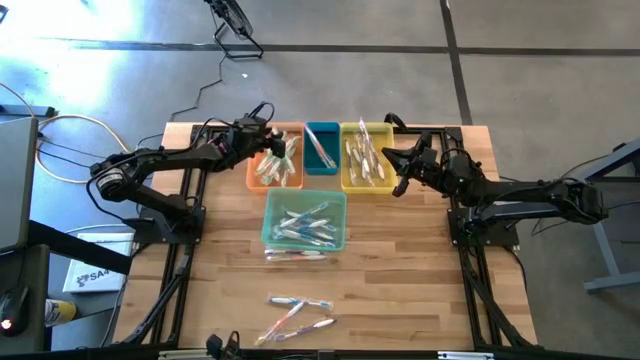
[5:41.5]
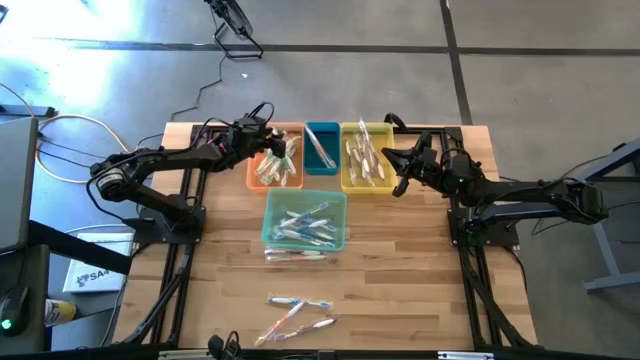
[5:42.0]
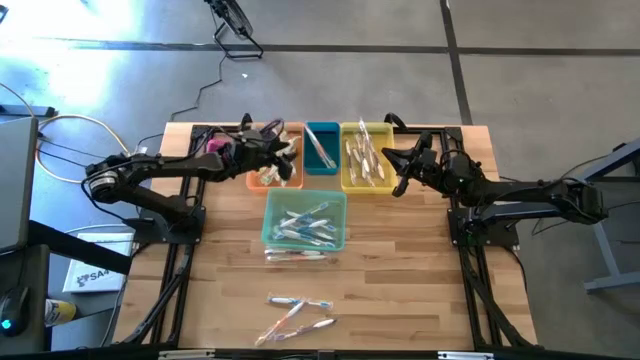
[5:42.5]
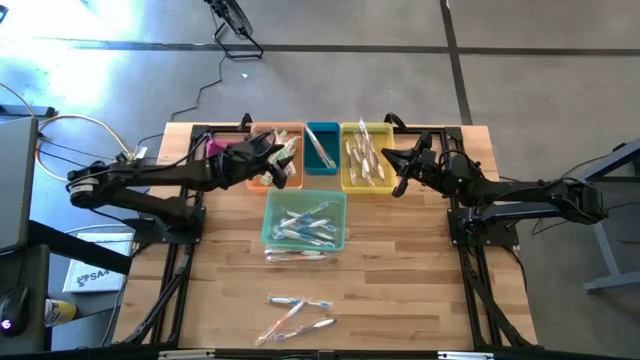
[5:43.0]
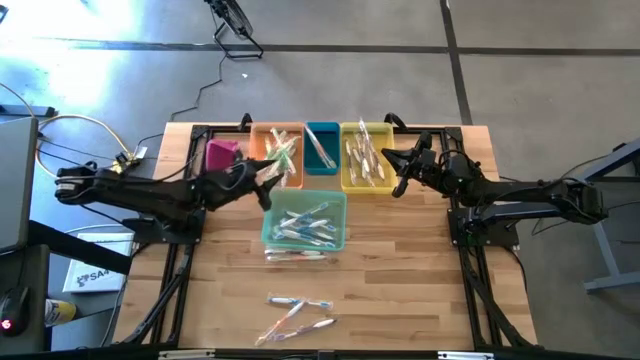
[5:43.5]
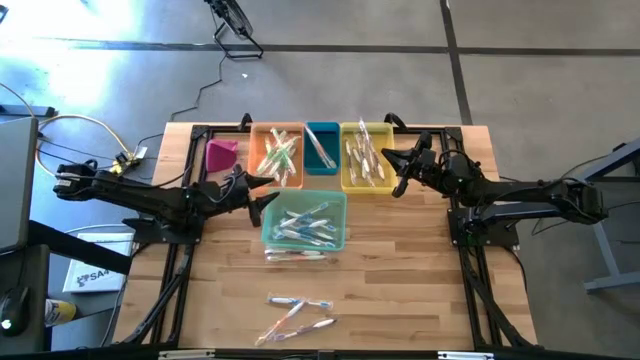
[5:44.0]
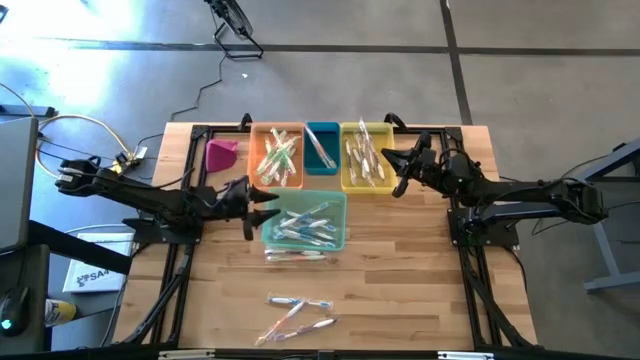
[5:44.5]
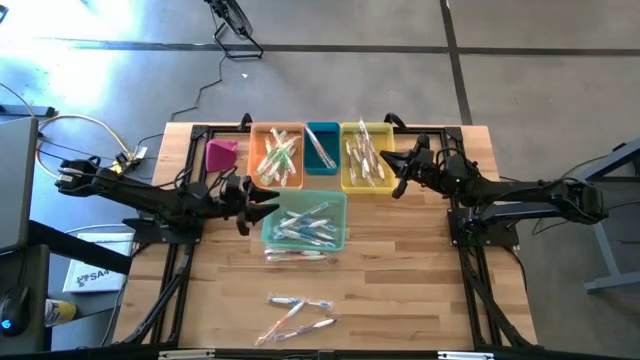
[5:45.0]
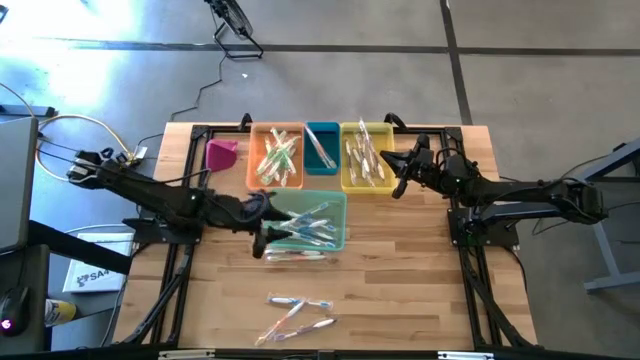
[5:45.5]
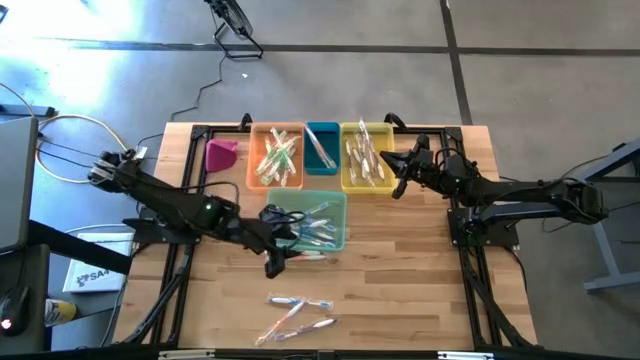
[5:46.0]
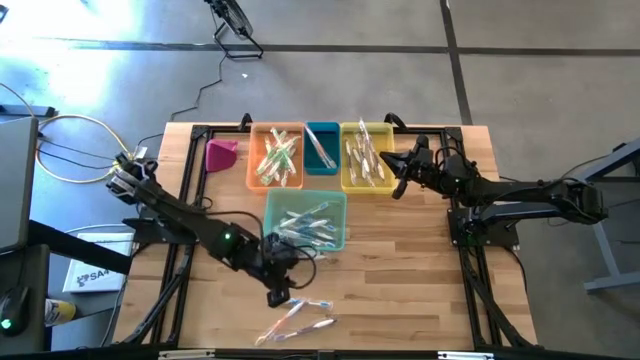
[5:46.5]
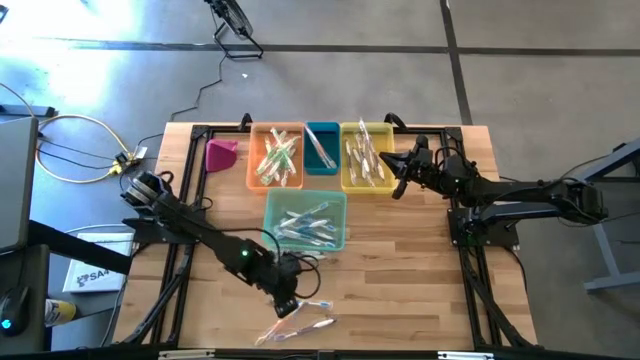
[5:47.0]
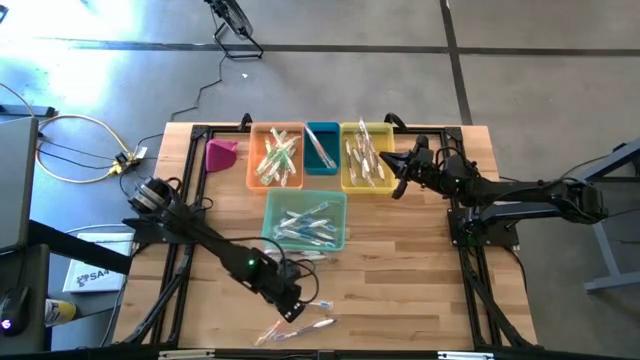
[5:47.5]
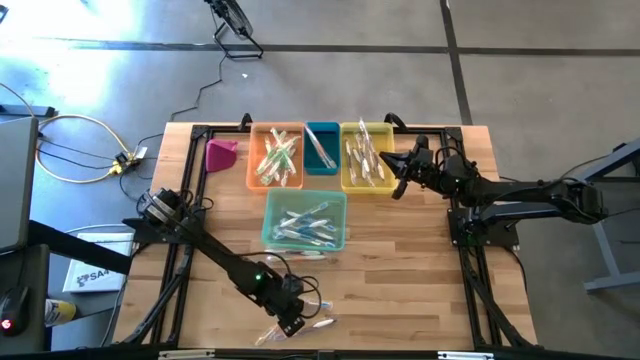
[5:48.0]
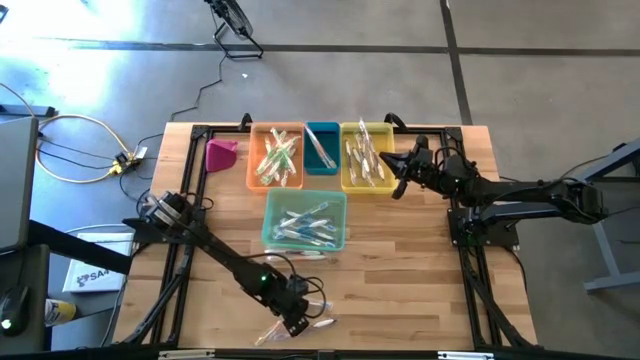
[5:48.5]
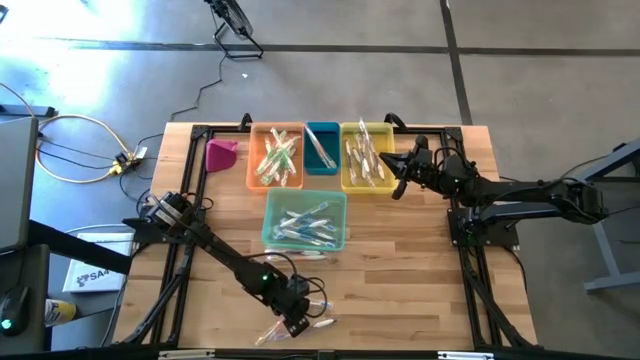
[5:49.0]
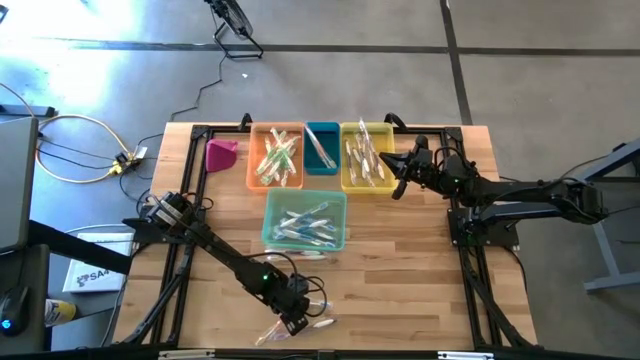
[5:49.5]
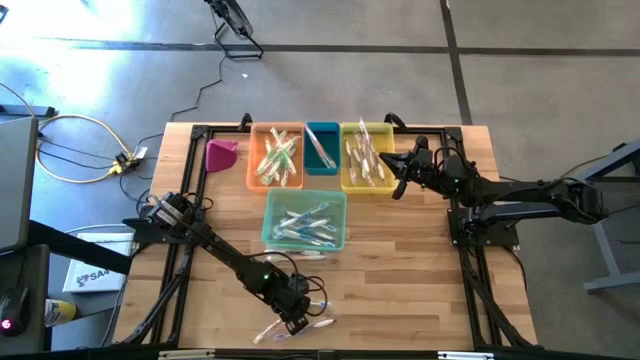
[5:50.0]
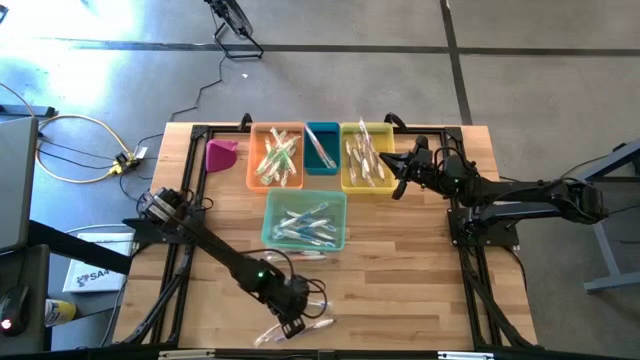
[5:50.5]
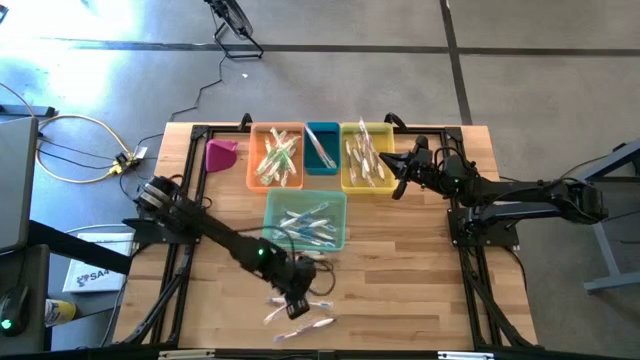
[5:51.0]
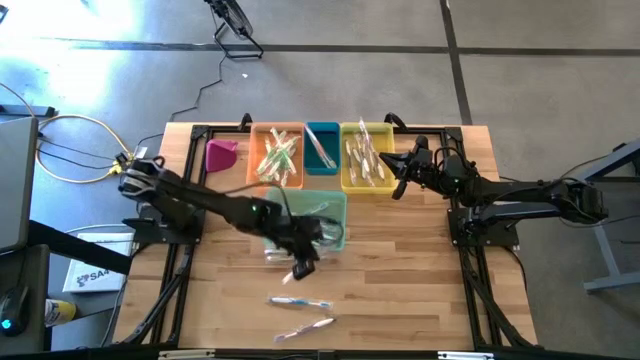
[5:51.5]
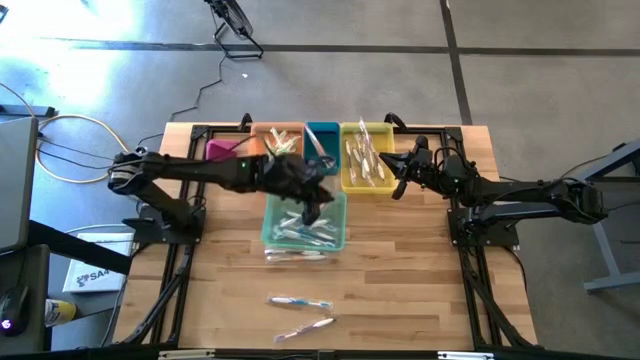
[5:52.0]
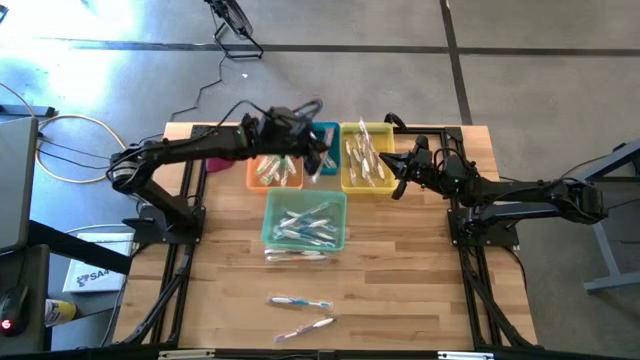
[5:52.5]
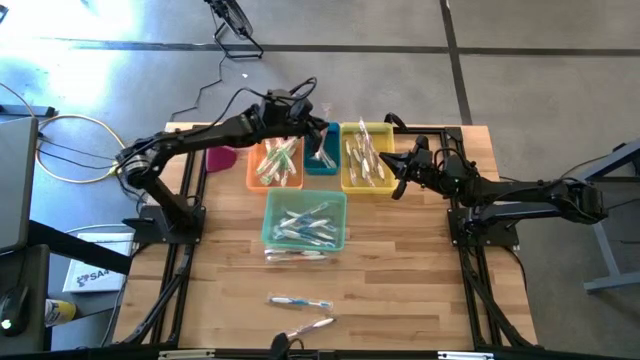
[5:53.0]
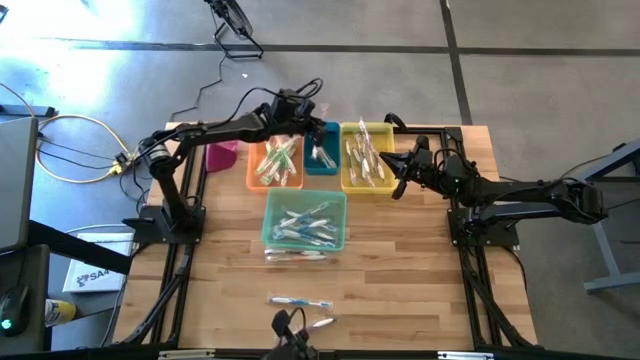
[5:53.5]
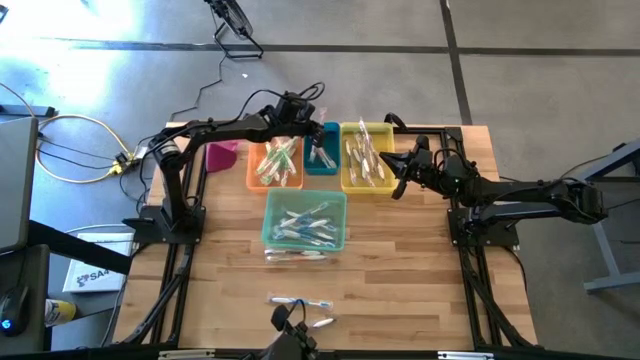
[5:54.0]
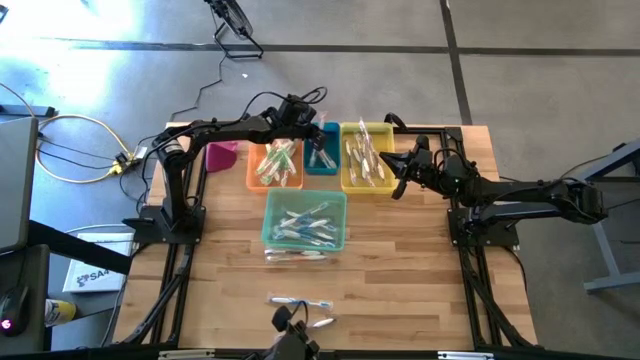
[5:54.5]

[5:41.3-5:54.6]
Task: Pick & Place Toothbrushes
Put the orange toothbrush into the blue bin
